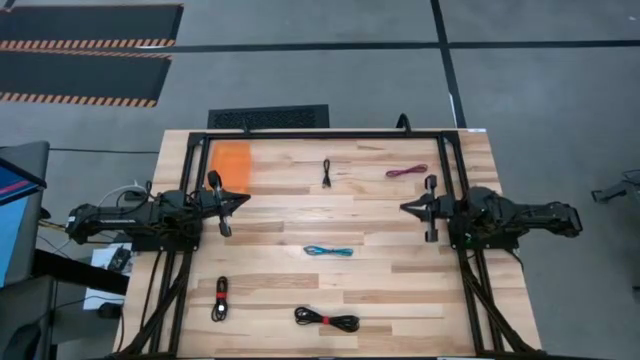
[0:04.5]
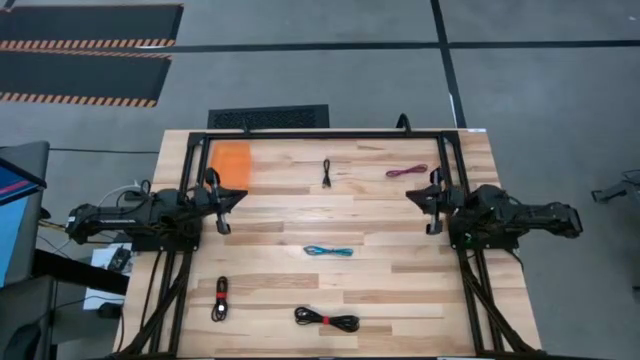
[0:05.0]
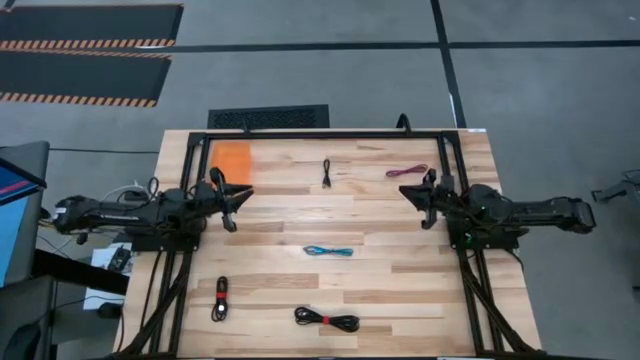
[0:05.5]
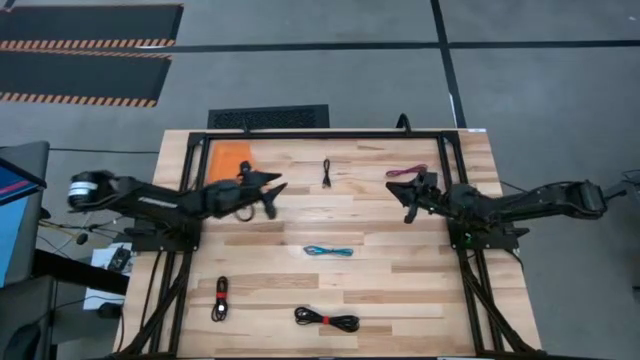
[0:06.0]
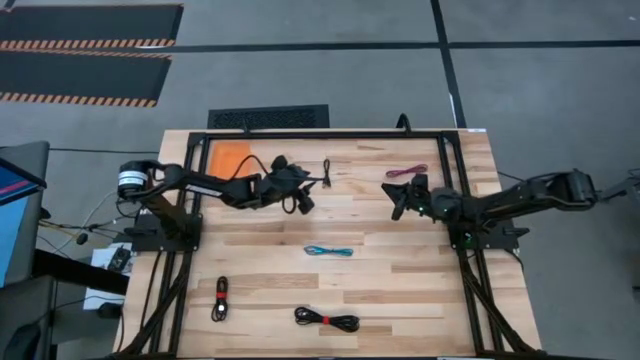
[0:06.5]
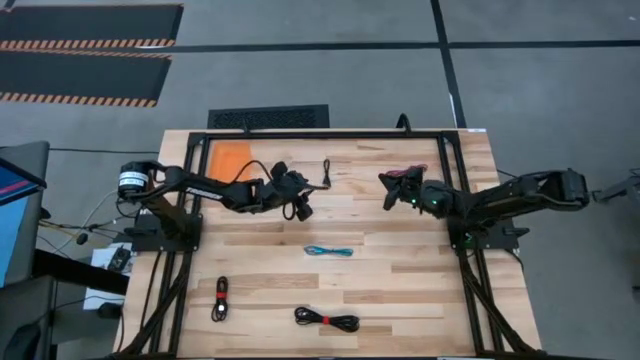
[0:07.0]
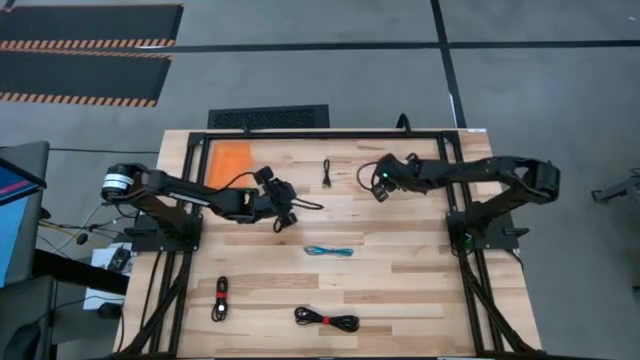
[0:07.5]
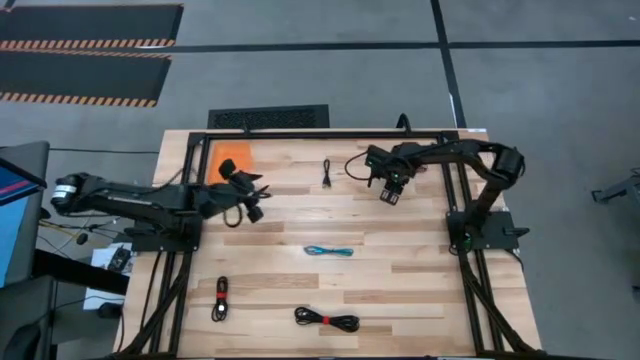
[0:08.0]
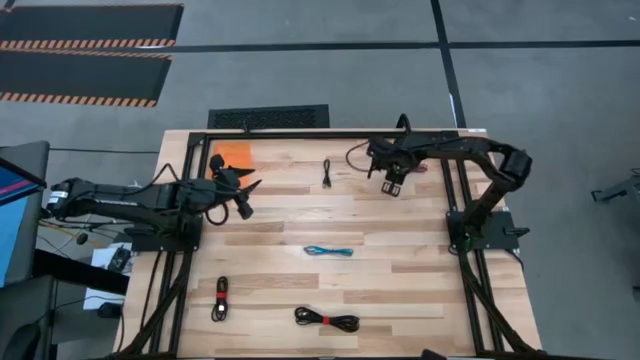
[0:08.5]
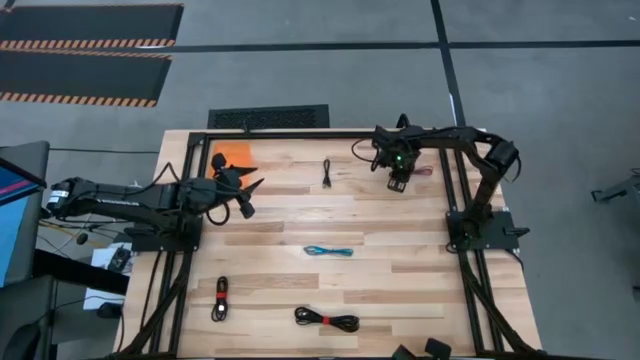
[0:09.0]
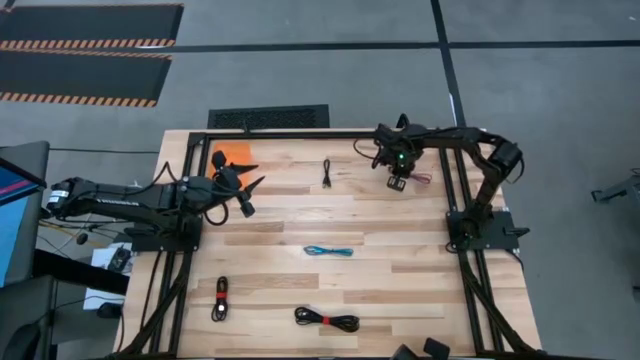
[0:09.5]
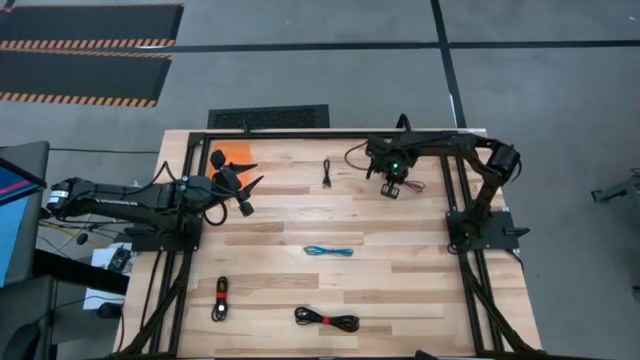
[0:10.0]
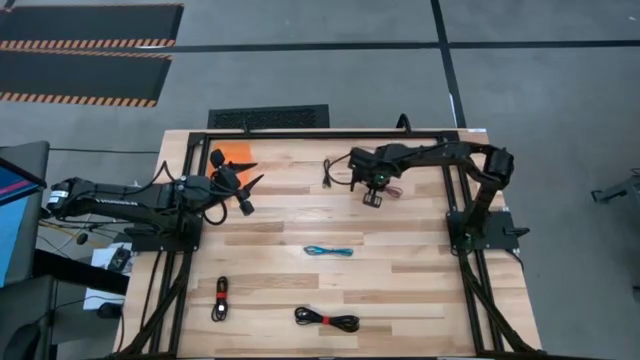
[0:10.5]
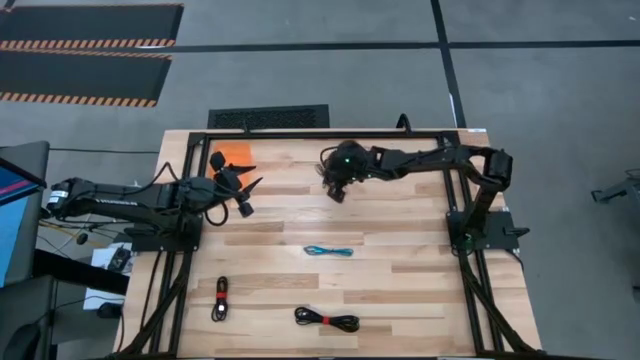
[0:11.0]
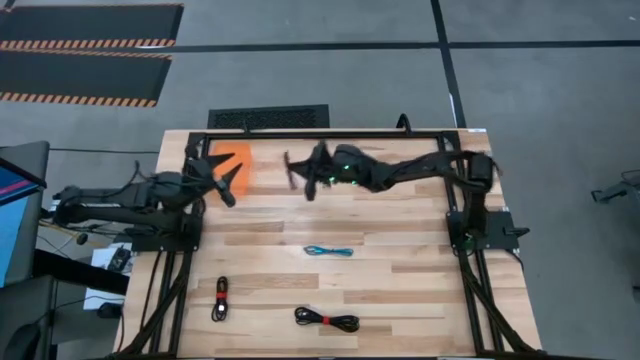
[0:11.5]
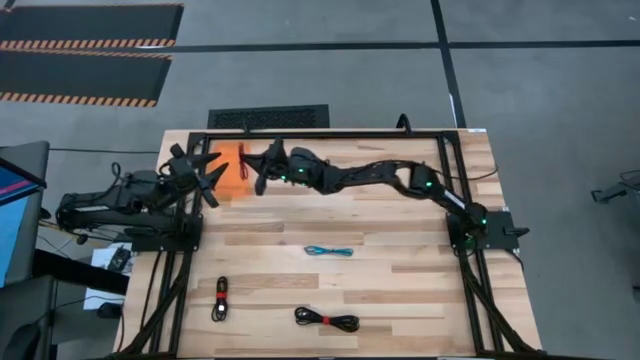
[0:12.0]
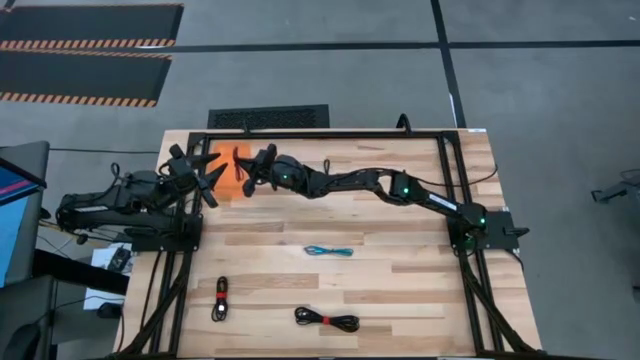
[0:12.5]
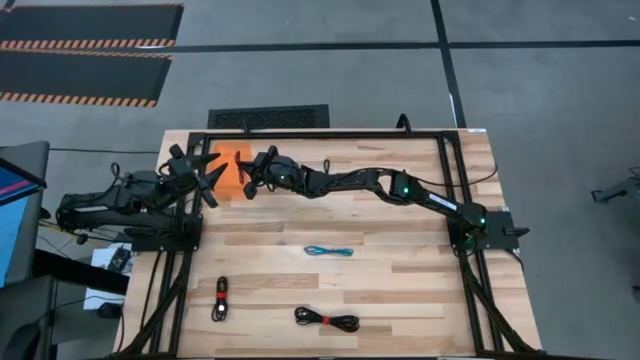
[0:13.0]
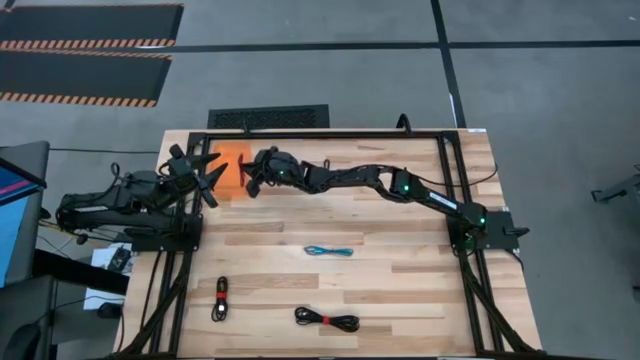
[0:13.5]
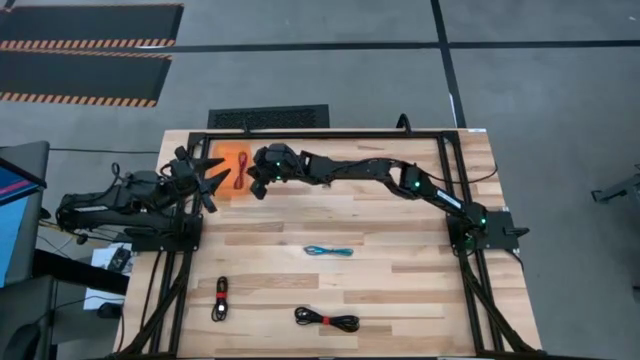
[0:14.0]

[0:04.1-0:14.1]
Task: Pick and place USB-C Cables
Put the pink charger cable into the orange bin

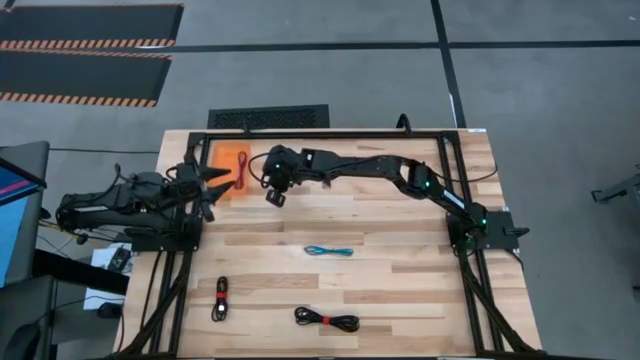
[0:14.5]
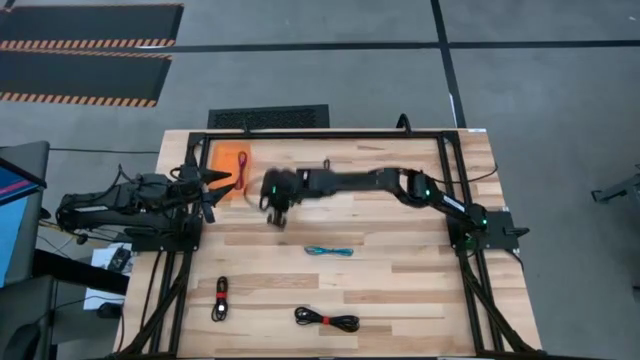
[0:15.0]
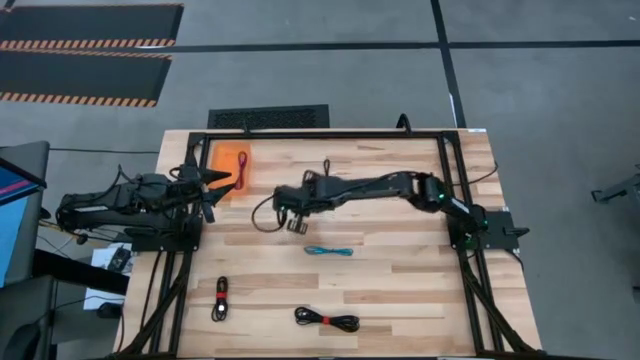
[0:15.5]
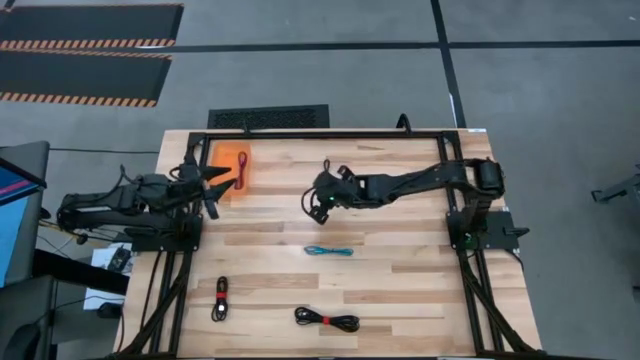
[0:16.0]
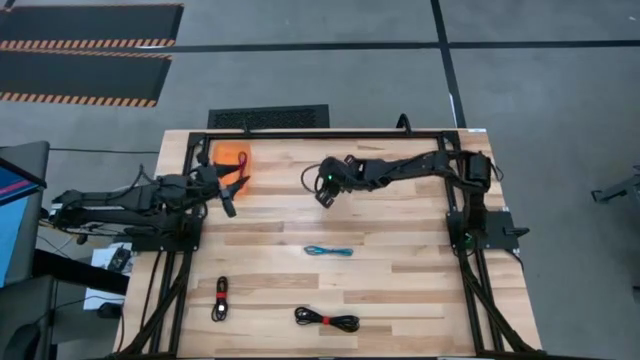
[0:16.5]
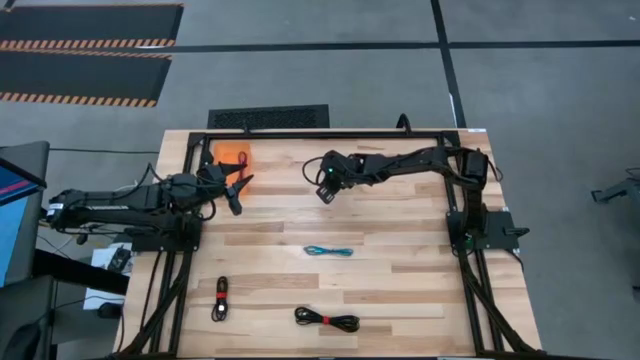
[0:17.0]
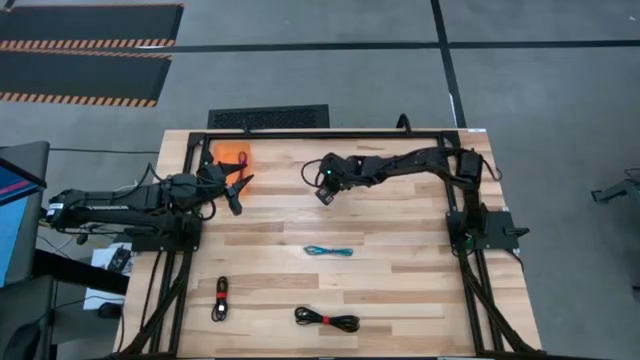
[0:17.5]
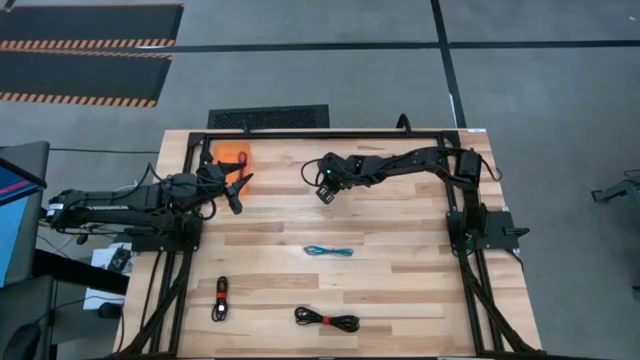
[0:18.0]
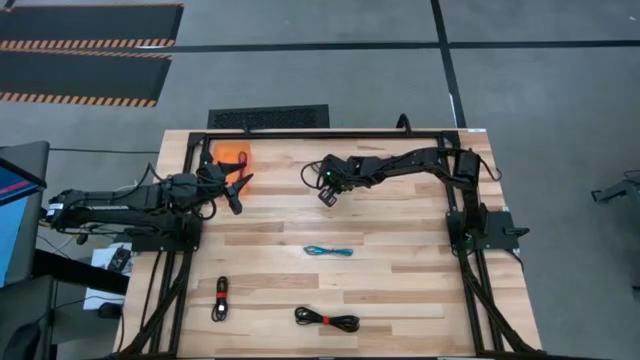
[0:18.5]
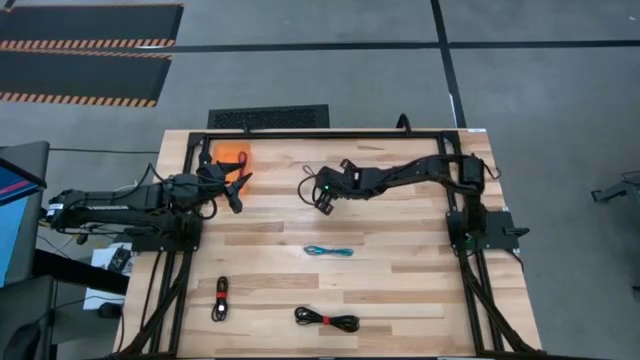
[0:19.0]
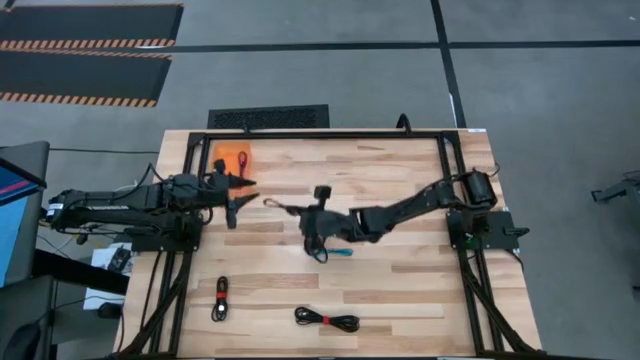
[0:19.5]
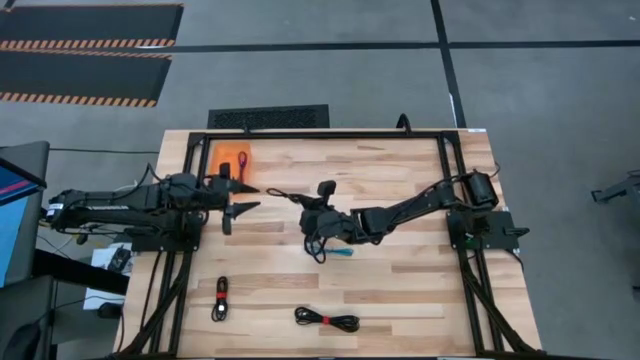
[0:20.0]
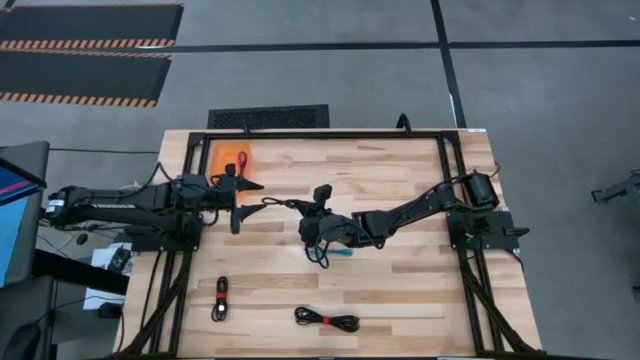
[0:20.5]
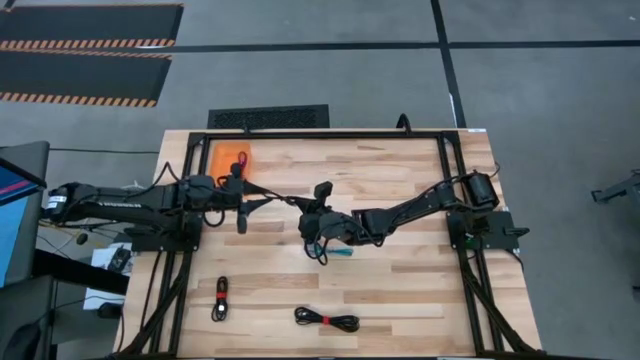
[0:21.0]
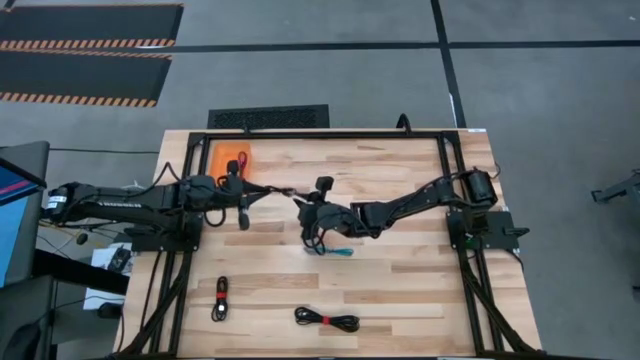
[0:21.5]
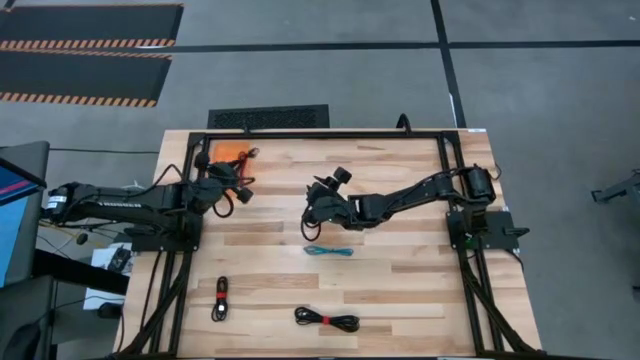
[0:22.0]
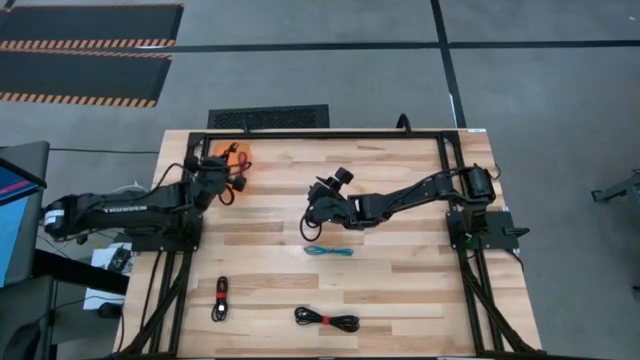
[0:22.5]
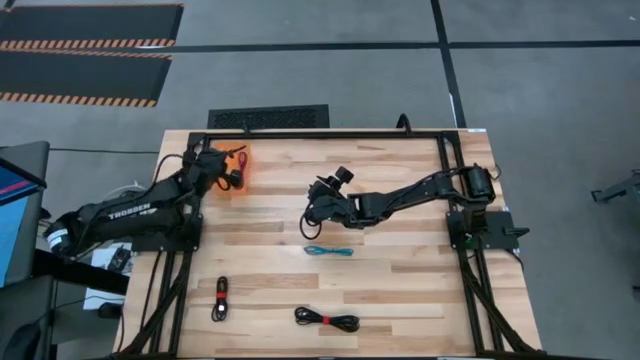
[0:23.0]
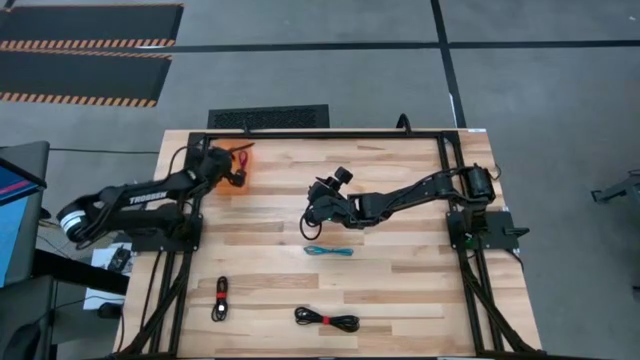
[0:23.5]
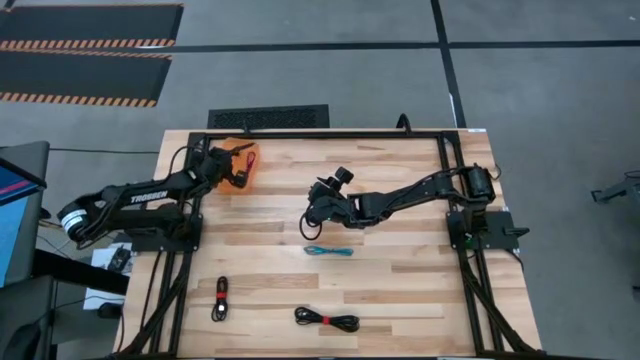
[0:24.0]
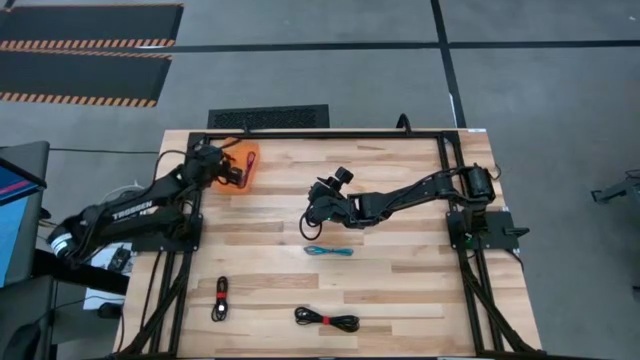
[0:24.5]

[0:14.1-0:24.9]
Put the top black charger cable into the orange bin
